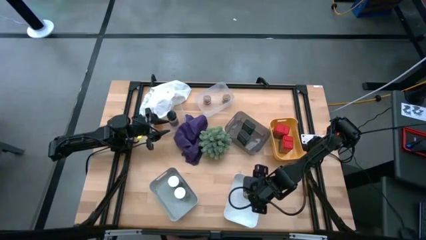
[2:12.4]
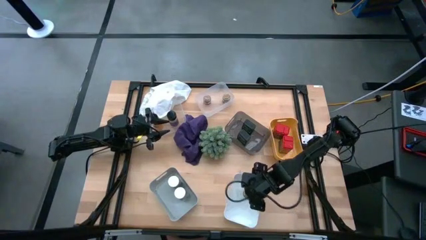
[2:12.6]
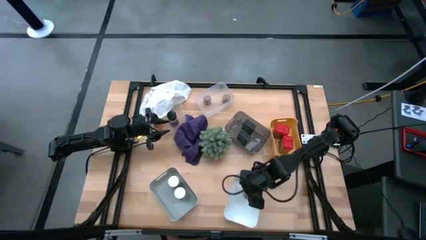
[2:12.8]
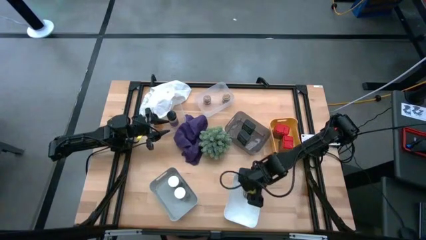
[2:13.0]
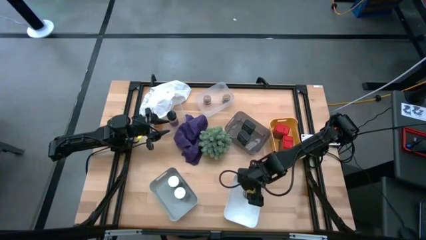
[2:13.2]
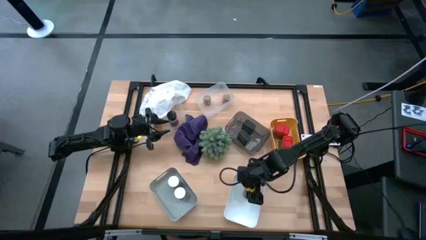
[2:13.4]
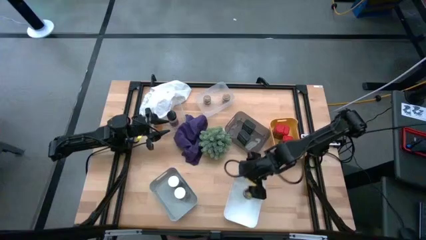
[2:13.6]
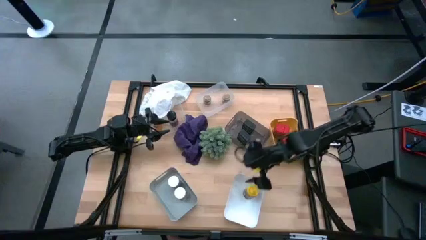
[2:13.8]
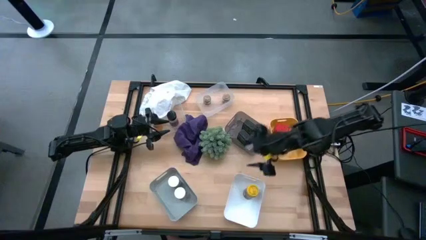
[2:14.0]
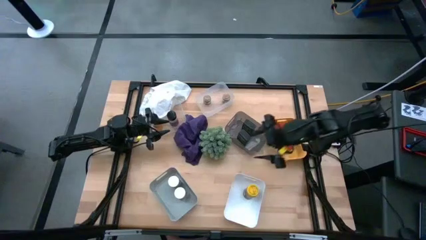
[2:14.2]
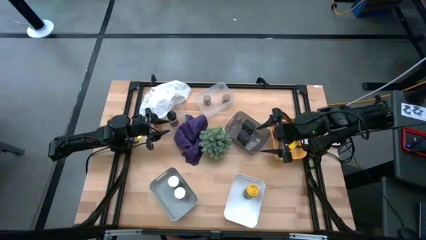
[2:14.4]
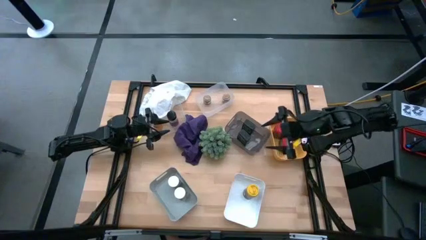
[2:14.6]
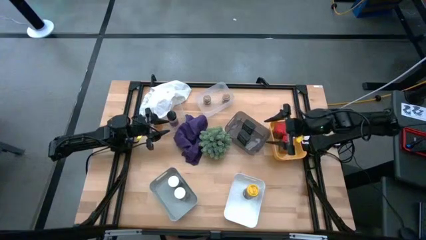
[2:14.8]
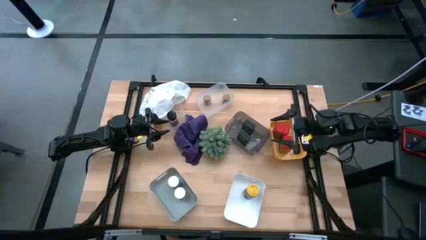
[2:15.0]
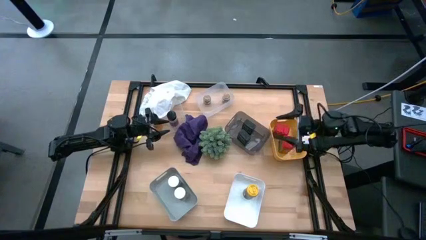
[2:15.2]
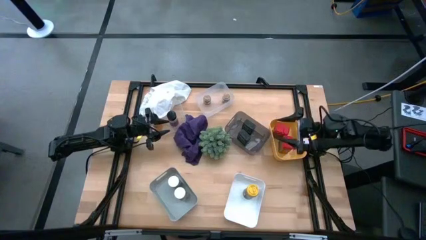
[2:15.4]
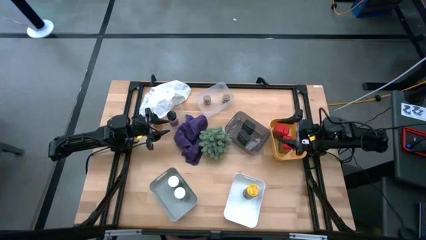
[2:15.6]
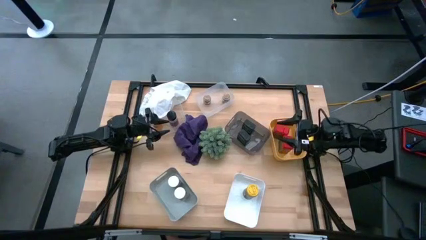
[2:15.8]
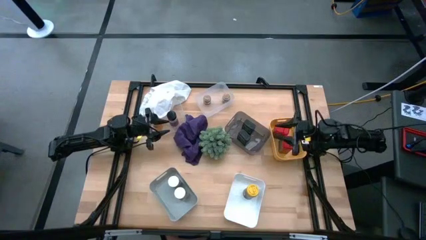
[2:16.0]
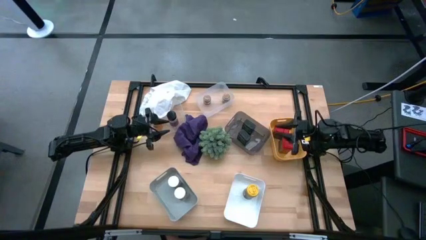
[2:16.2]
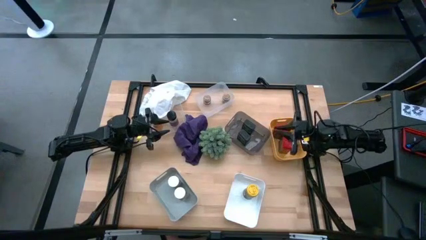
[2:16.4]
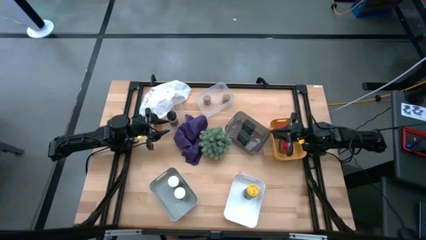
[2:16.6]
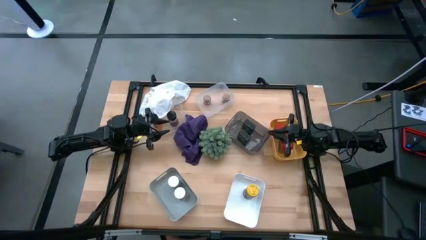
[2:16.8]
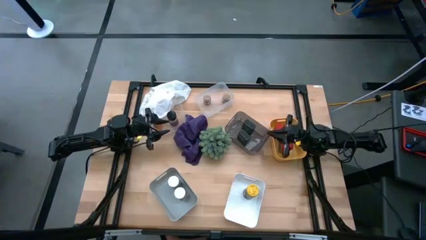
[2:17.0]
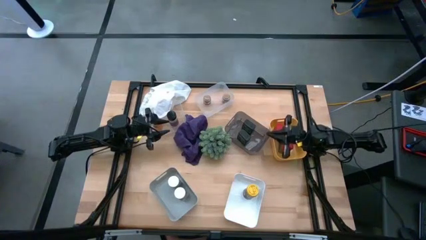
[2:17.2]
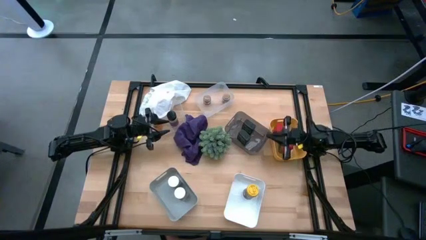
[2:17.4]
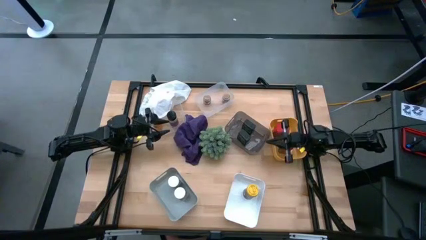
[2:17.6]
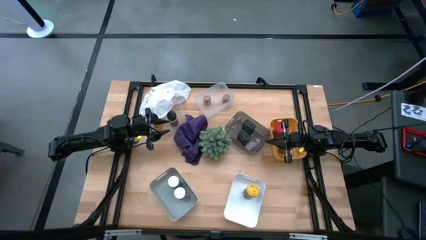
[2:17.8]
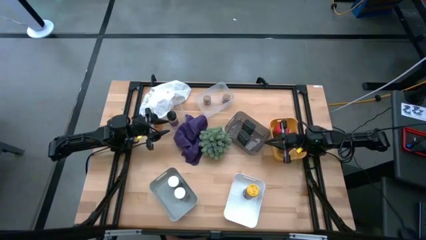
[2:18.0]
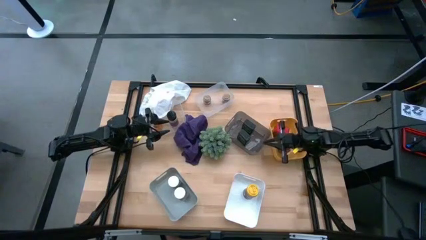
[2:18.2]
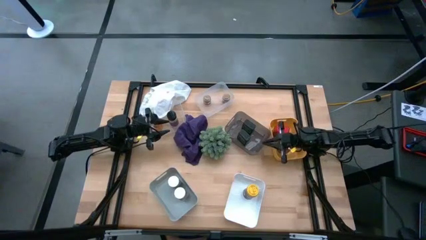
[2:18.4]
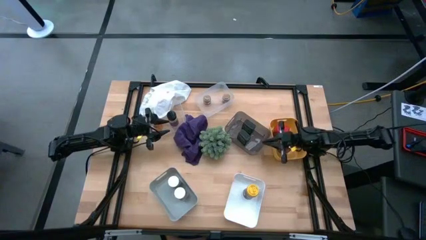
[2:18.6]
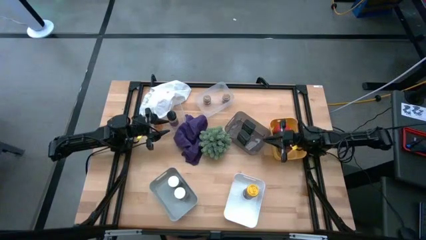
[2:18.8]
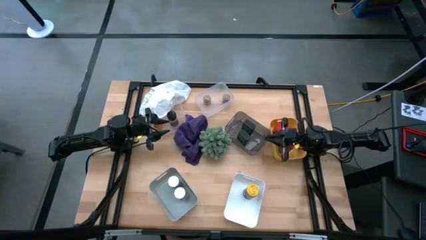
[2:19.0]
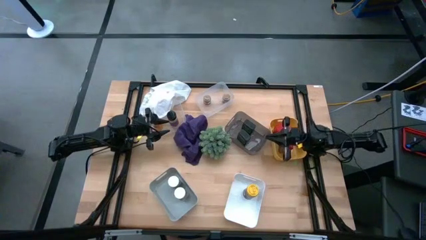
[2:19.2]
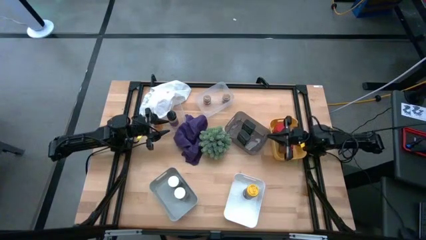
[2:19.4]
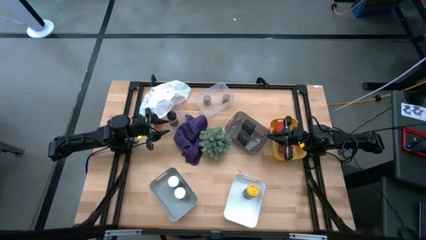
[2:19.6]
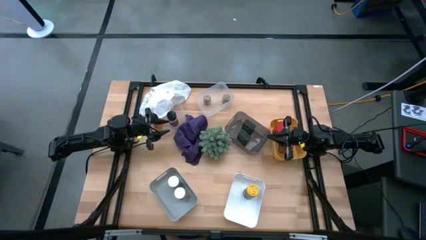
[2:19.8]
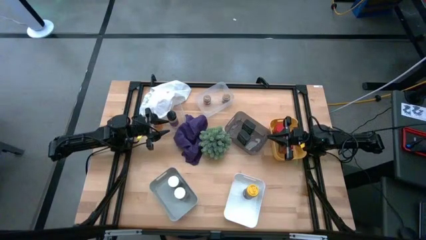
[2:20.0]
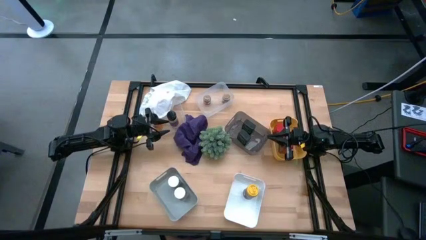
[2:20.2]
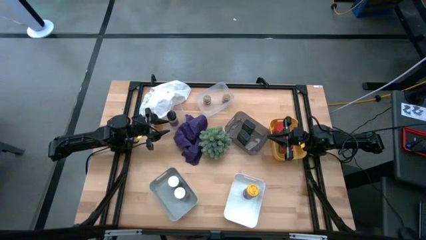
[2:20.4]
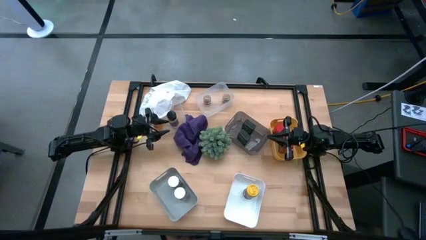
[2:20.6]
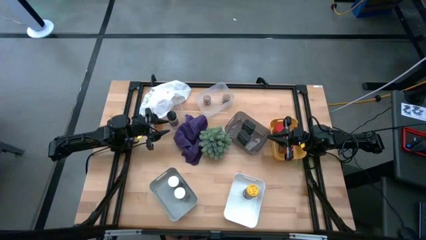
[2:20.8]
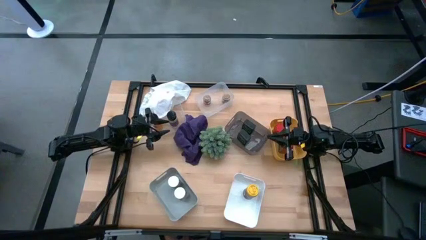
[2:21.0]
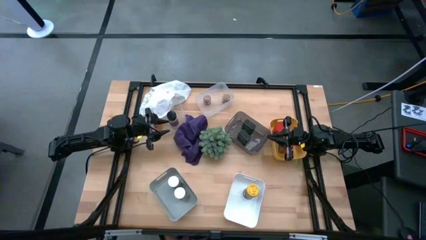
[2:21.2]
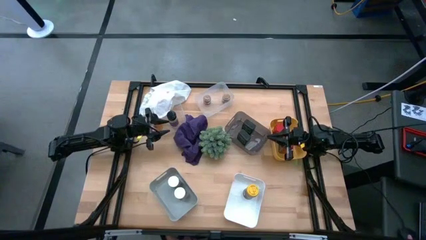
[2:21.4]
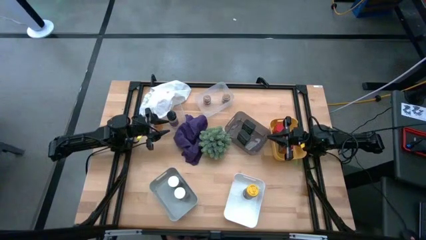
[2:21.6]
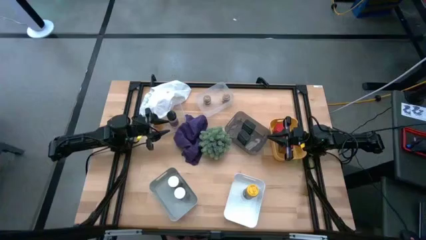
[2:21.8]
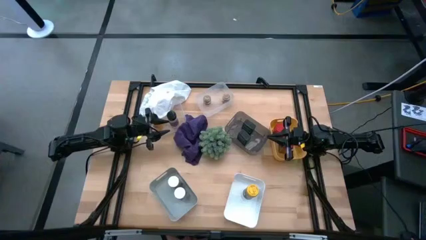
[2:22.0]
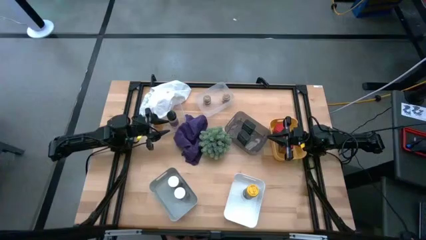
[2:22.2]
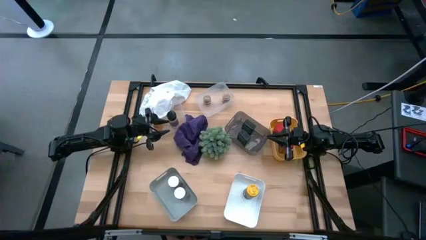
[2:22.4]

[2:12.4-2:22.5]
Task: Sort spices by type
Return to Home Position

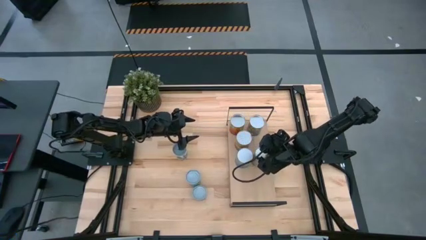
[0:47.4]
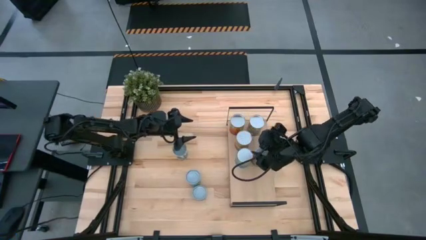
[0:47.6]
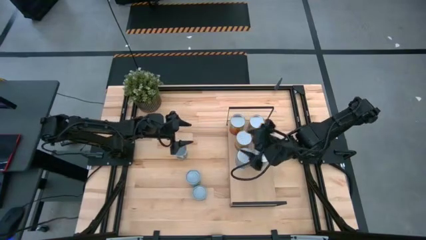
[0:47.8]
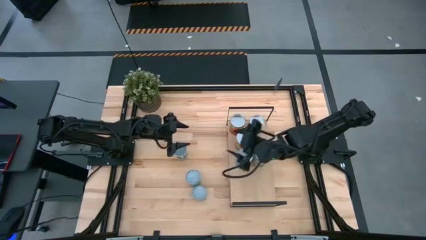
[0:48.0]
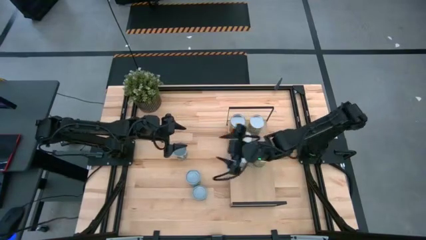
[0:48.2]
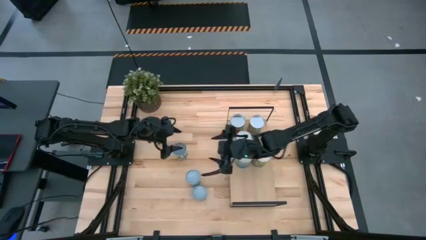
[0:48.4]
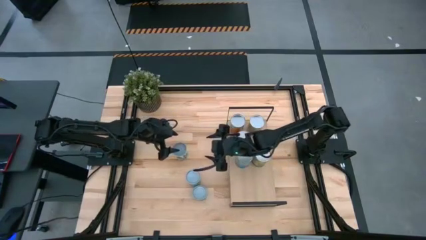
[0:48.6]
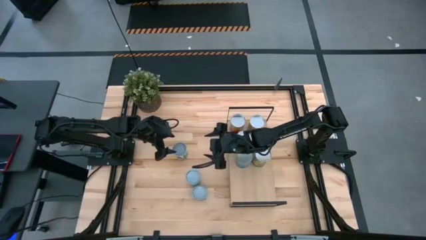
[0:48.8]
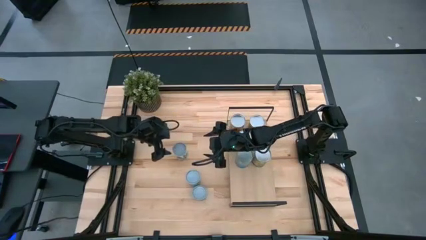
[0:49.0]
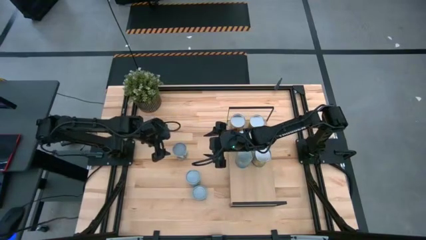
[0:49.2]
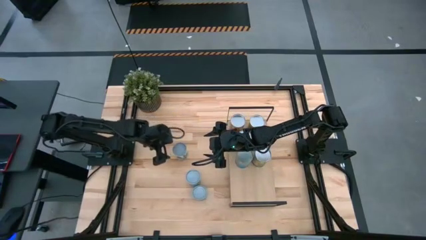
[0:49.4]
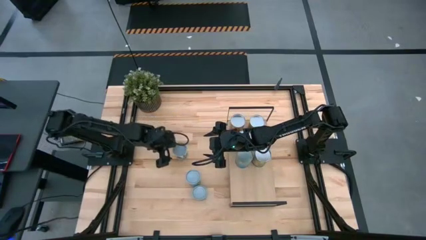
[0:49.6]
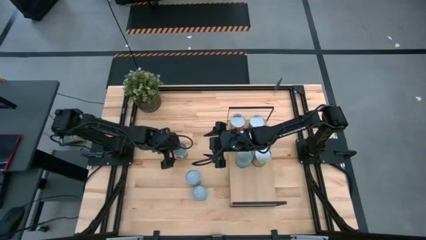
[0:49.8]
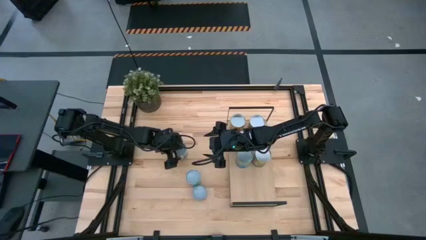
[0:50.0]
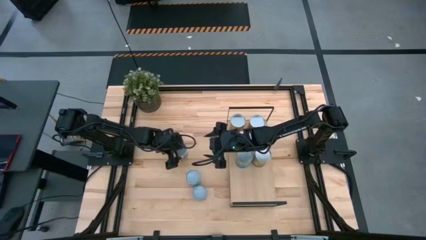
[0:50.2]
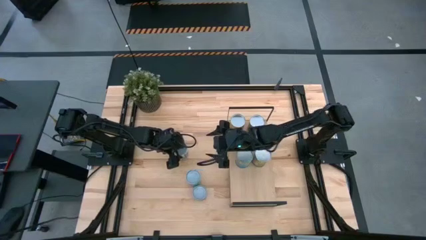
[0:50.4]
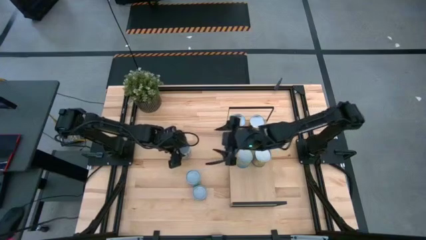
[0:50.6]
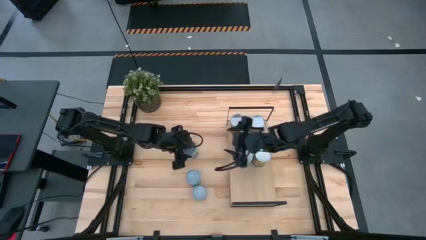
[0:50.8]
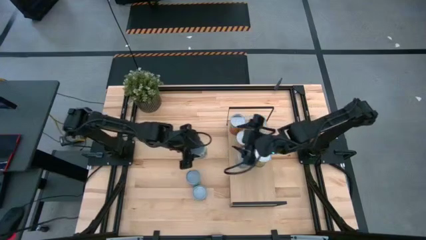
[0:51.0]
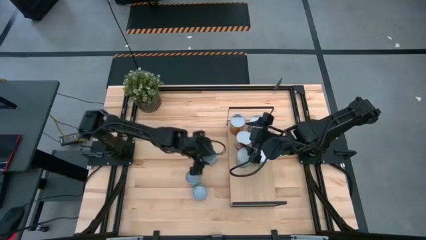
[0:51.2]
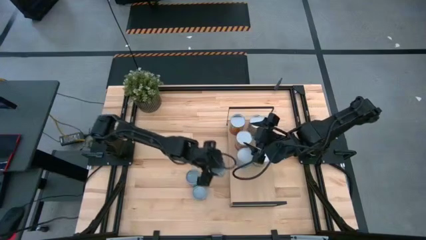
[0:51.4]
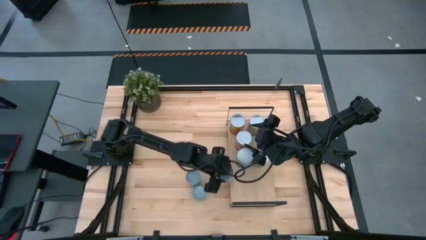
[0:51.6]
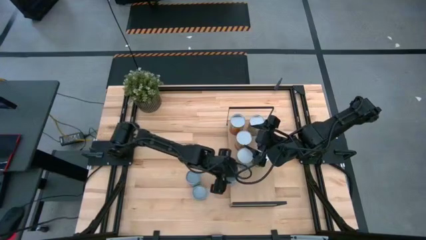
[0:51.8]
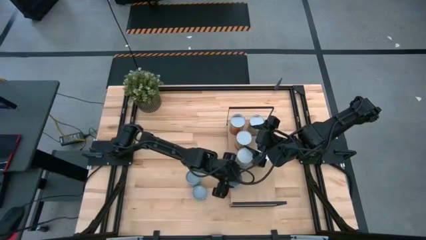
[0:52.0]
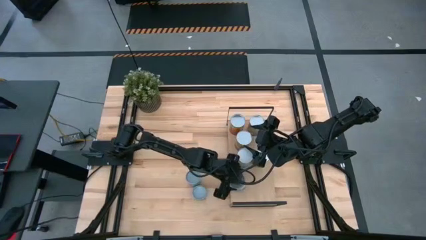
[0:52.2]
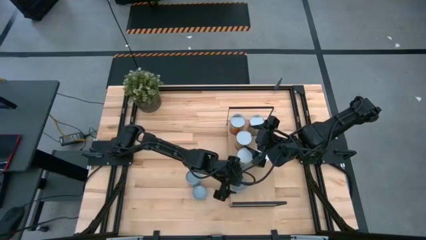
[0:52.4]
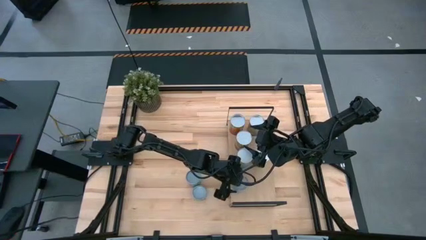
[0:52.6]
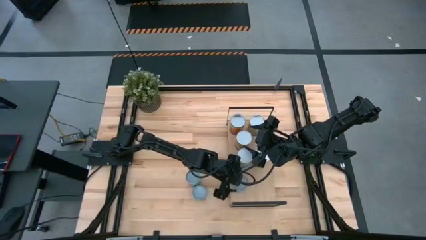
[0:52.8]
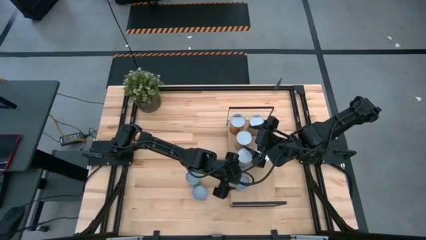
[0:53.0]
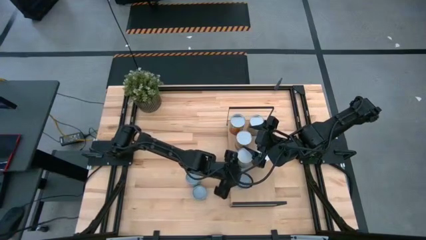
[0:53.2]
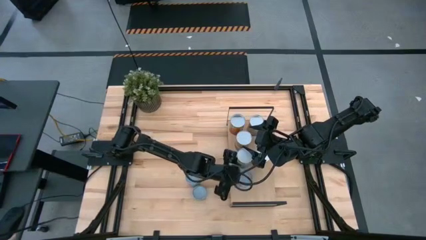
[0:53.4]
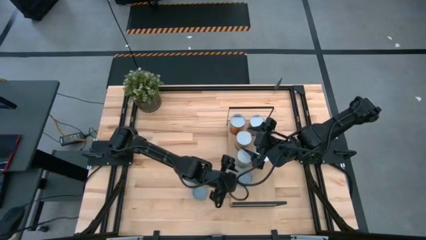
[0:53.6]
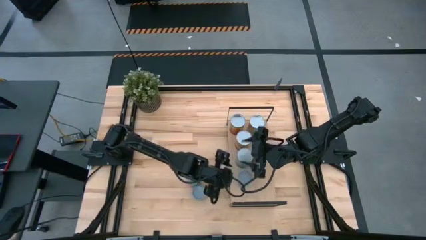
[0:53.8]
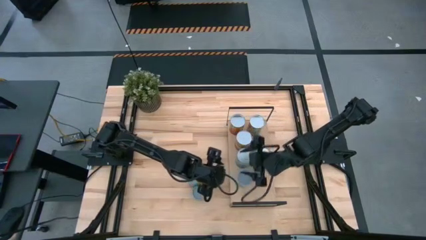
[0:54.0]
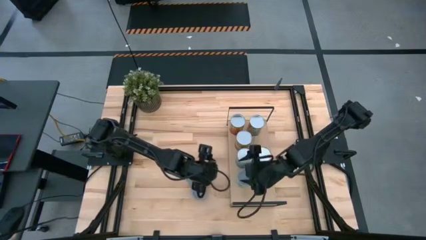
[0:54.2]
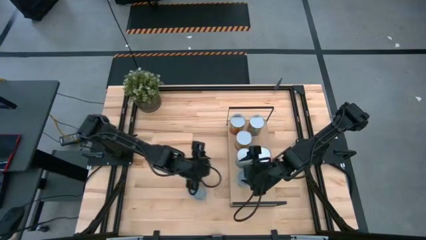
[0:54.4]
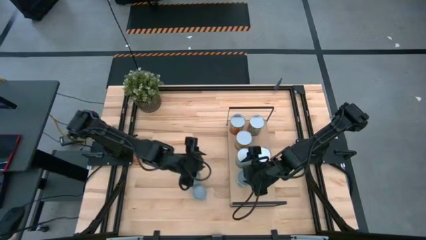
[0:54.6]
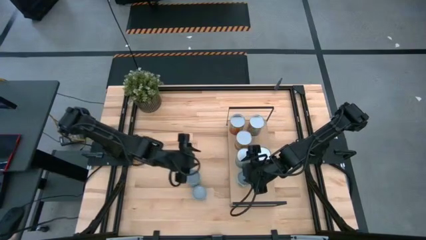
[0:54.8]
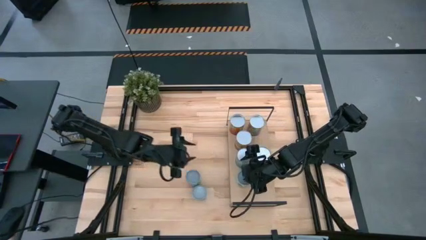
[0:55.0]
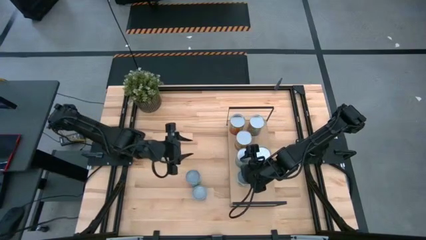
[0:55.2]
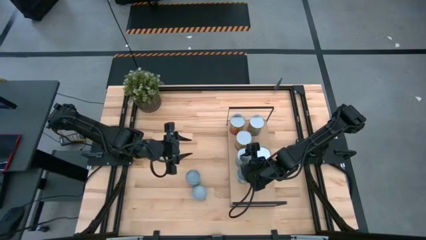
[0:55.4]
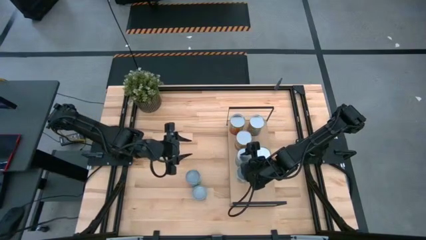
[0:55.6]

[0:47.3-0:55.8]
Task: Pick and place cans onto a shelf
Put the canned mixed vegetables on the shelf
